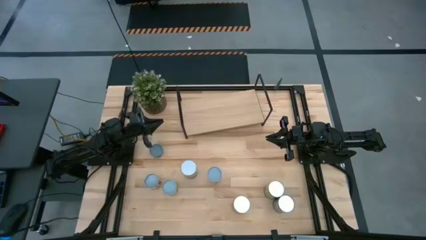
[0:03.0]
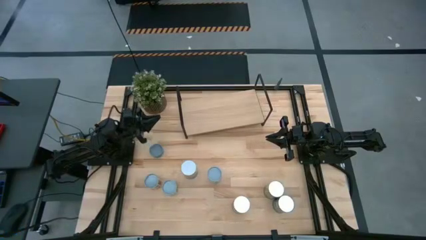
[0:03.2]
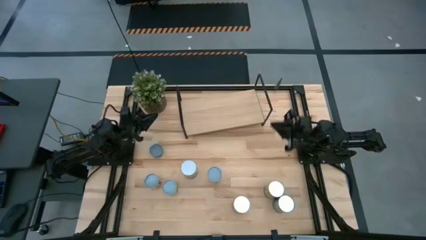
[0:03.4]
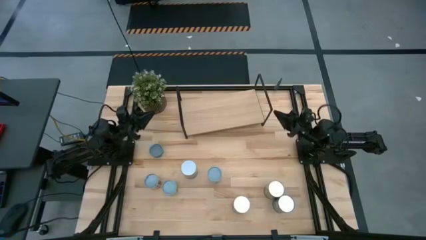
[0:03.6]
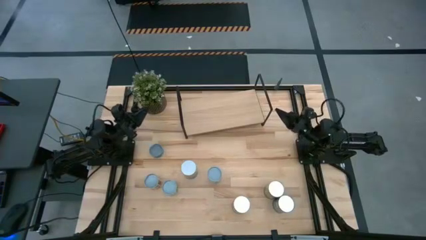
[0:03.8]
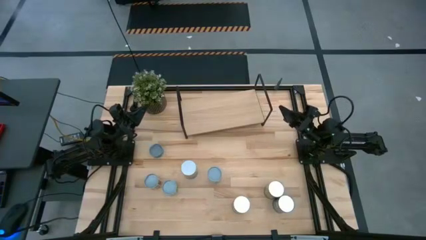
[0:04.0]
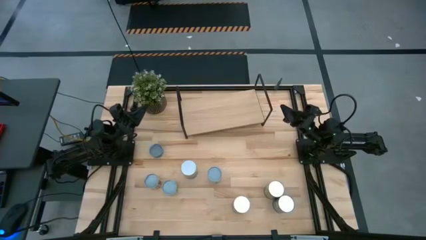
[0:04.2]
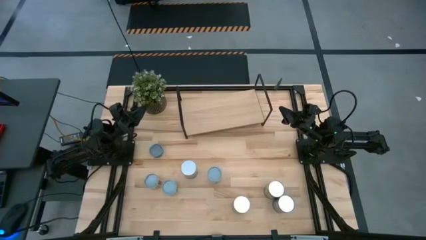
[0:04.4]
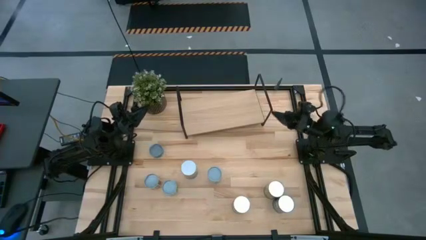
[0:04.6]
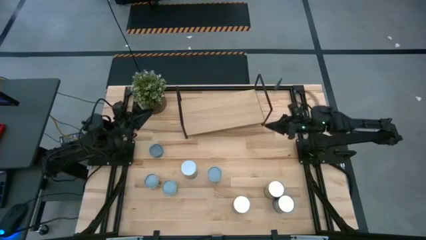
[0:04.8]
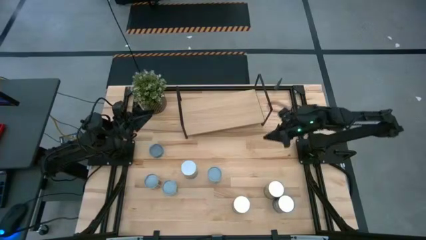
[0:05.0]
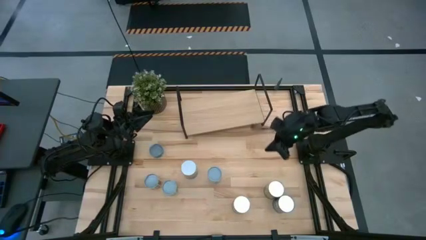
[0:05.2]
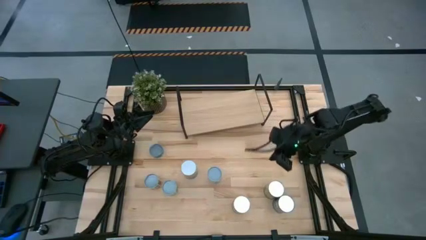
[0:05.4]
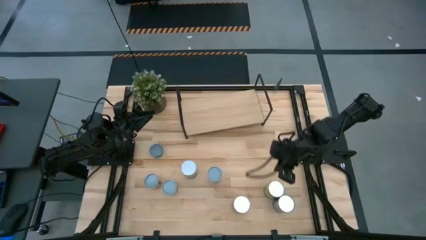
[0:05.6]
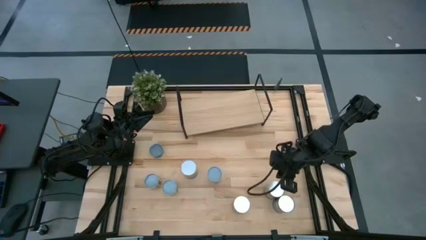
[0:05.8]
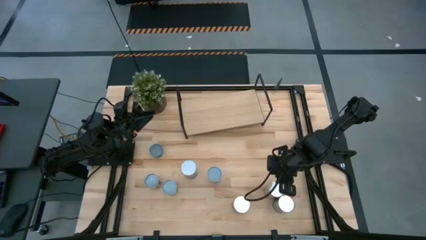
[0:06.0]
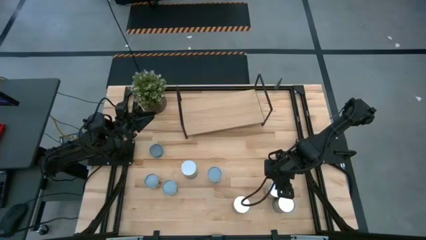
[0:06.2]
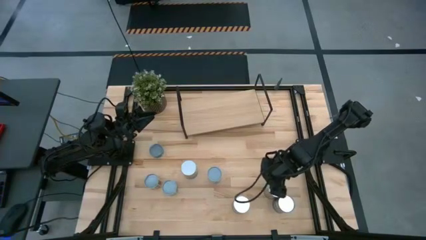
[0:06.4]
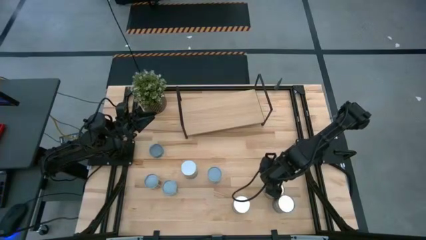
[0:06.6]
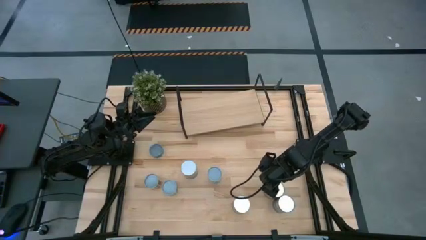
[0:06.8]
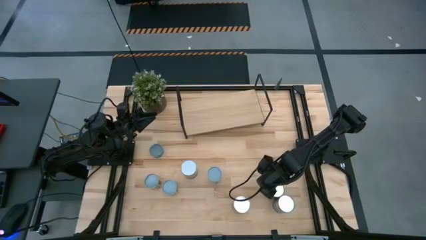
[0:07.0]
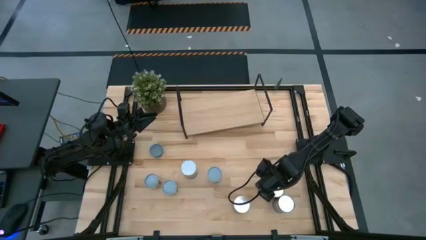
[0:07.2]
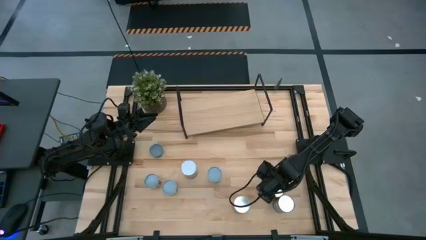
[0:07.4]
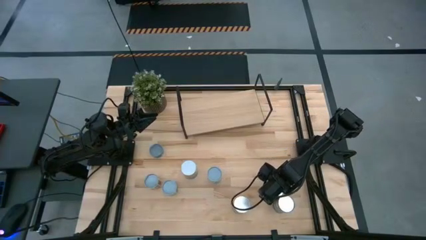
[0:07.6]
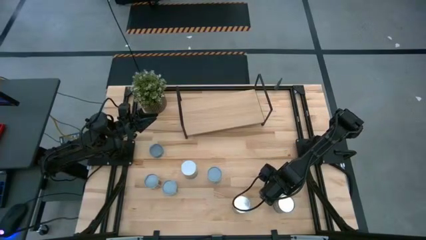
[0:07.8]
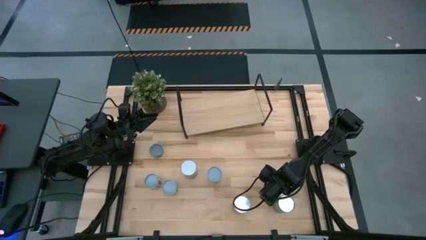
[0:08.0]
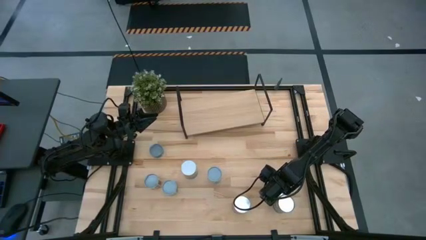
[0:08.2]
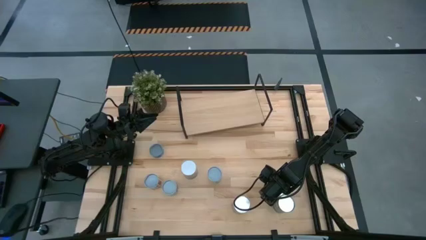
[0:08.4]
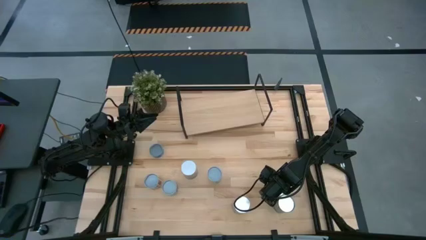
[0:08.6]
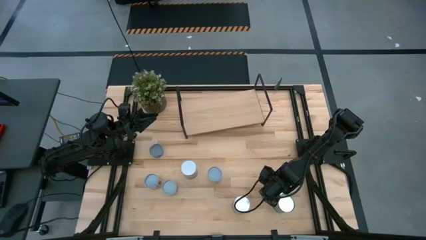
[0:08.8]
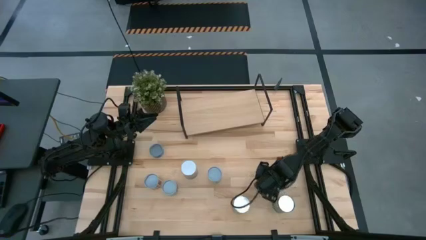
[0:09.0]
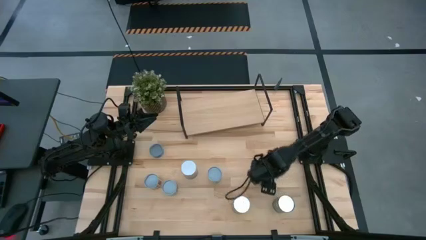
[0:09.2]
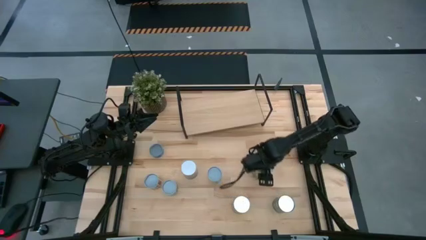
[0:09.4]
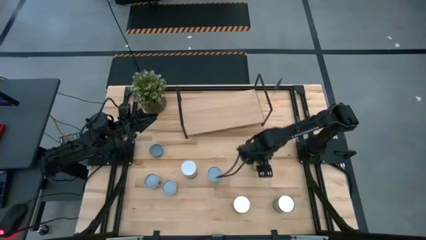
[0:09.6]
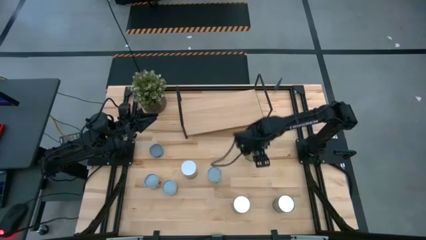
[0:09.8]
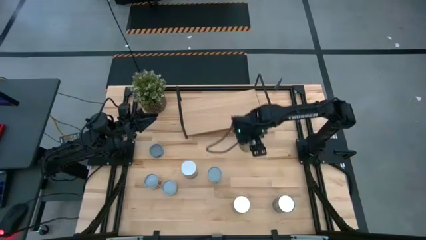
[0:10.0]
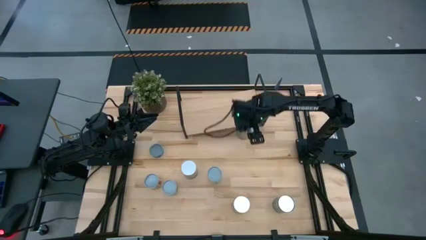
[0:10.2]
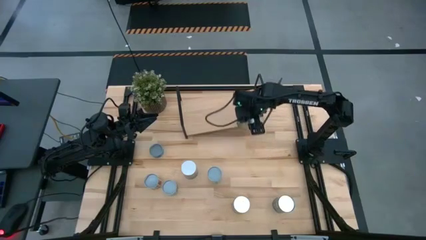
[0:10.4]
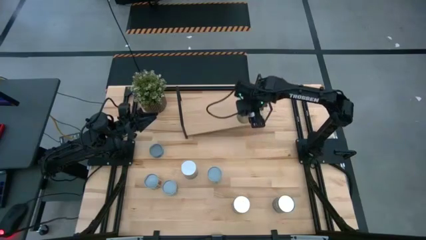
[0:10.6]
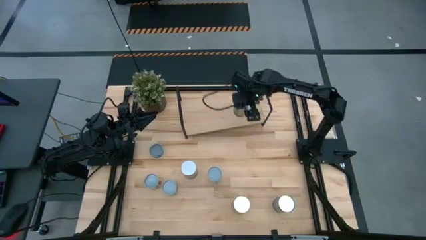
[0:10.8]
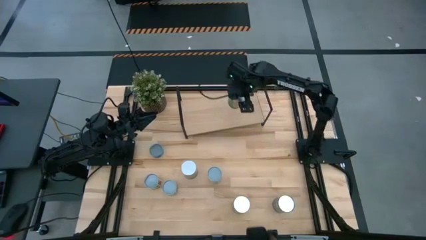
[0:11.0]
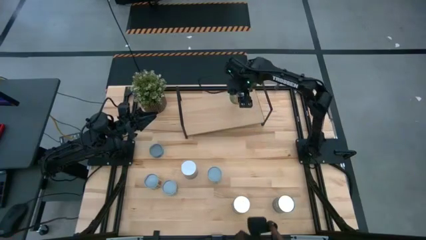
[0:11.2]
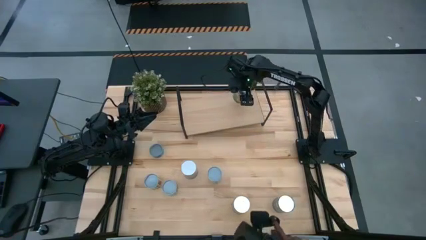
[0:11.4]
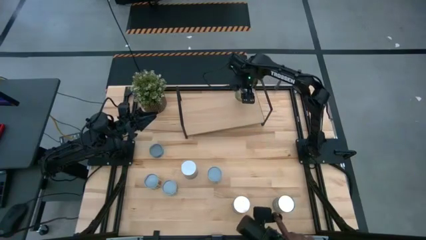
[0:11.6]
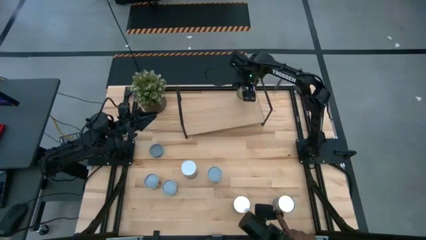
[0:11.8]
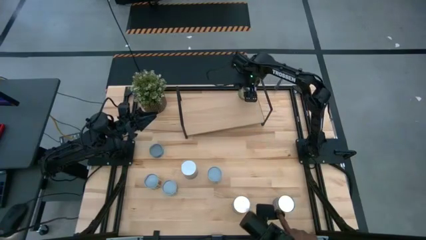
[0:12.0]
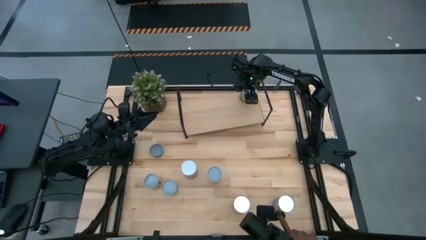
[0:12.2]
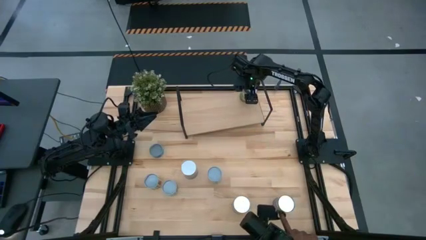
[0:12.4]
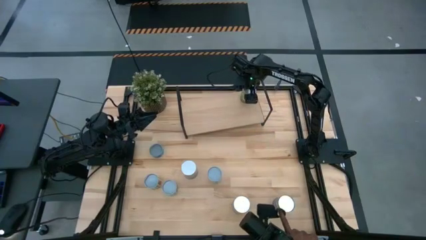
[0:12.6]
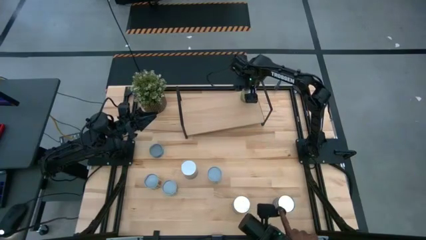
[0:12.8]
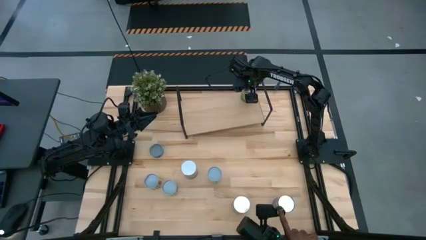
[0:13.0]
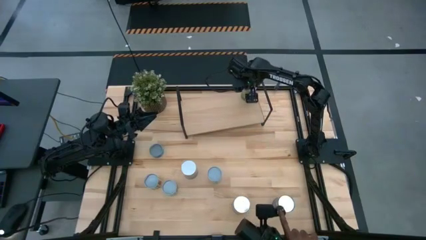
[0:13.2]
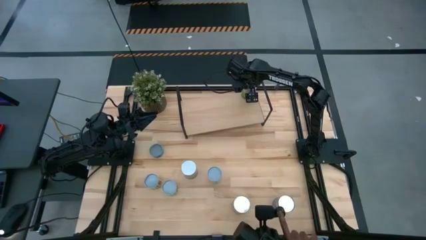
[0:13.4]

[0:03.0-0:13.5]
Task: Pick and place cans onto a shelf
Put the canned oranges on the shelf

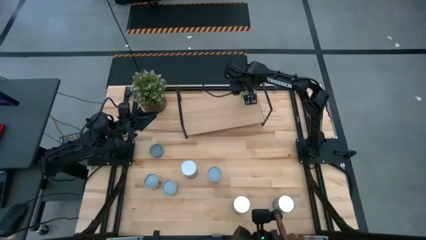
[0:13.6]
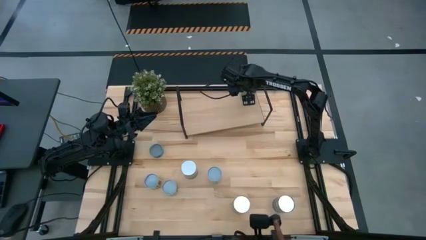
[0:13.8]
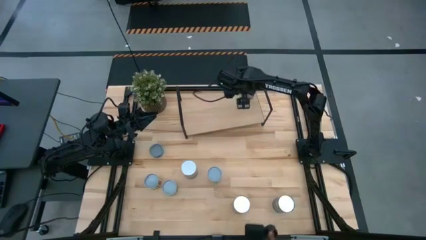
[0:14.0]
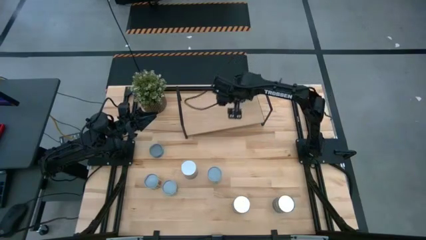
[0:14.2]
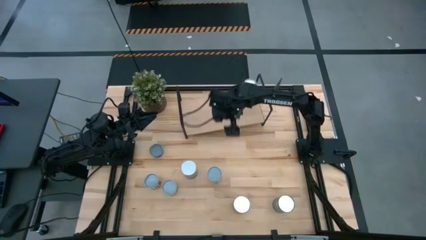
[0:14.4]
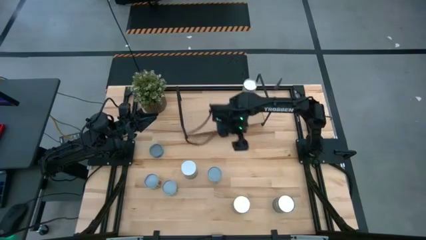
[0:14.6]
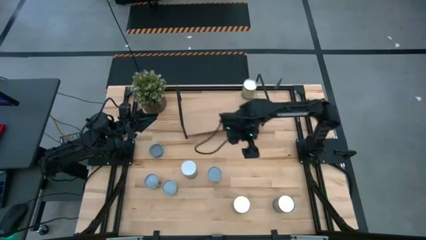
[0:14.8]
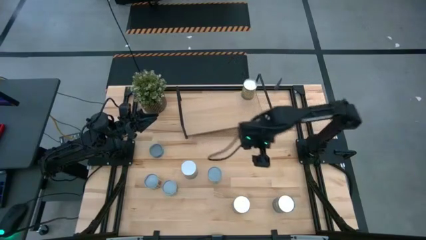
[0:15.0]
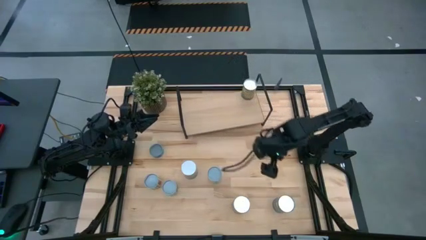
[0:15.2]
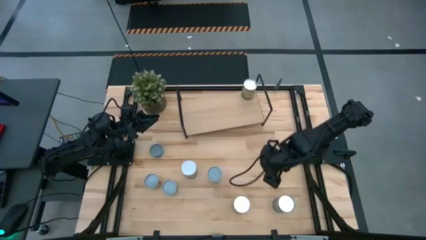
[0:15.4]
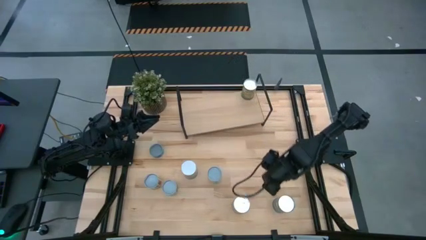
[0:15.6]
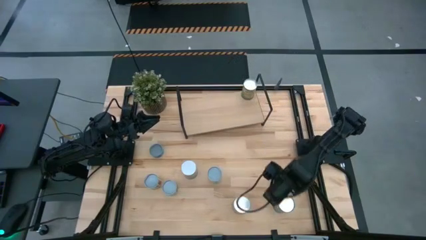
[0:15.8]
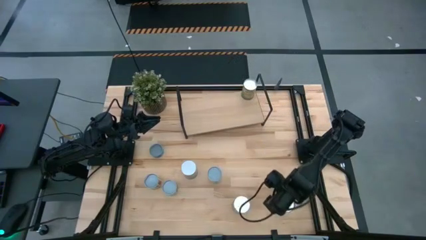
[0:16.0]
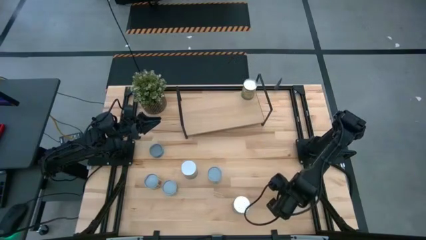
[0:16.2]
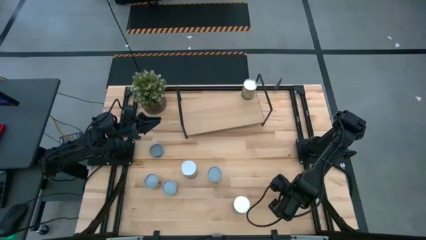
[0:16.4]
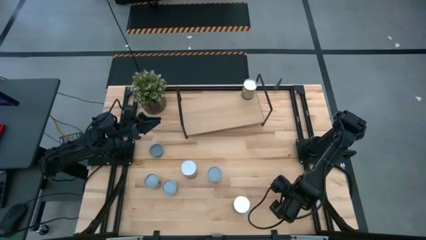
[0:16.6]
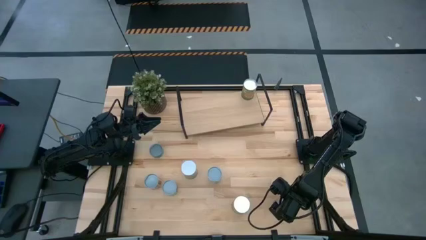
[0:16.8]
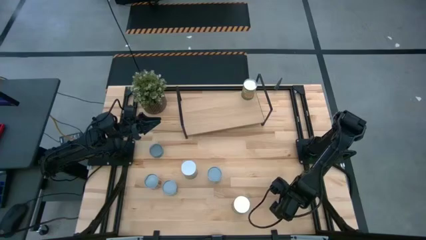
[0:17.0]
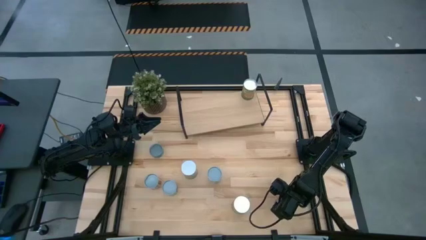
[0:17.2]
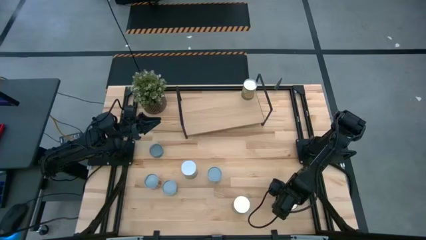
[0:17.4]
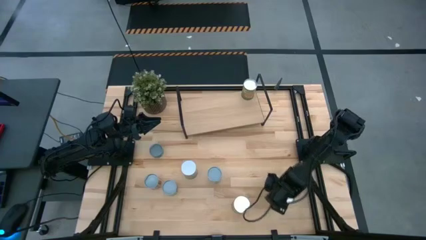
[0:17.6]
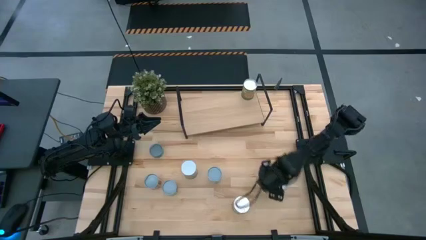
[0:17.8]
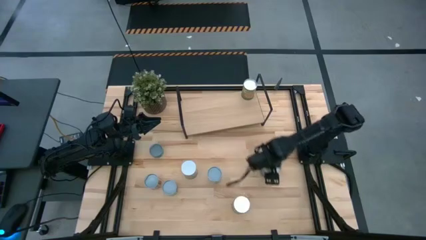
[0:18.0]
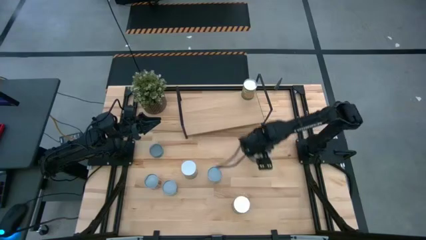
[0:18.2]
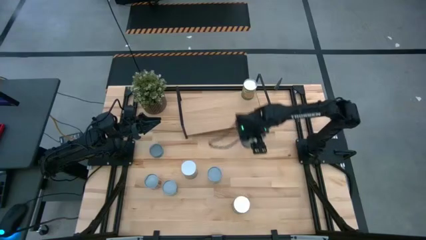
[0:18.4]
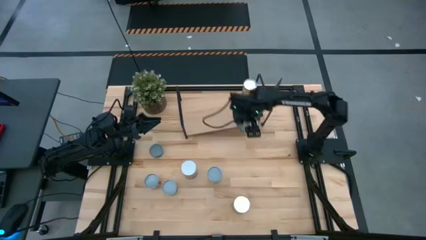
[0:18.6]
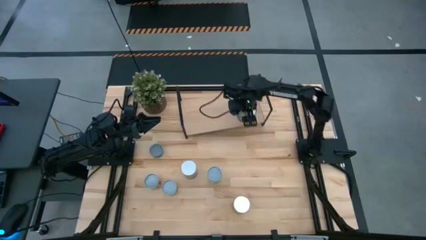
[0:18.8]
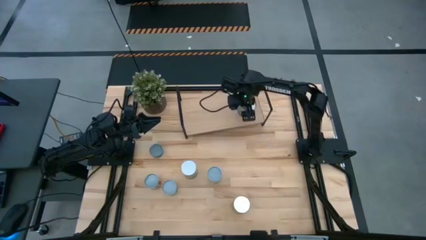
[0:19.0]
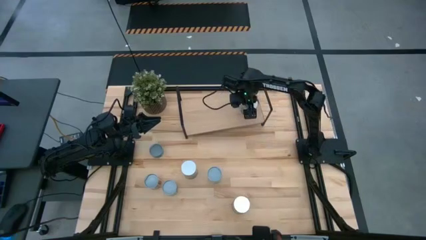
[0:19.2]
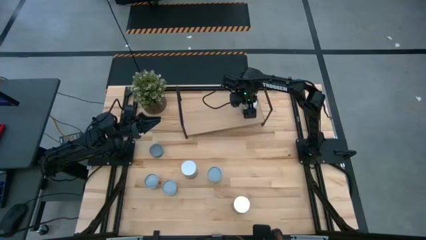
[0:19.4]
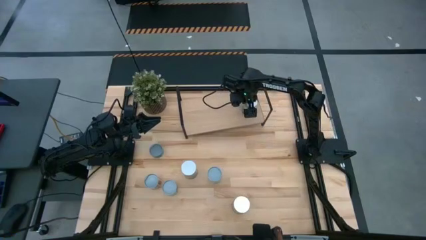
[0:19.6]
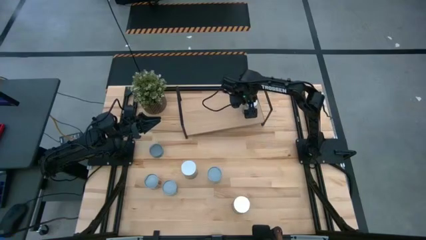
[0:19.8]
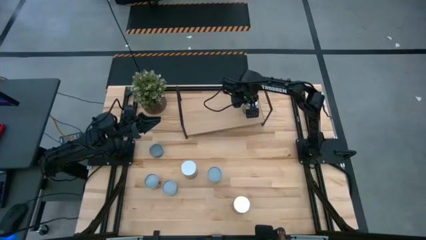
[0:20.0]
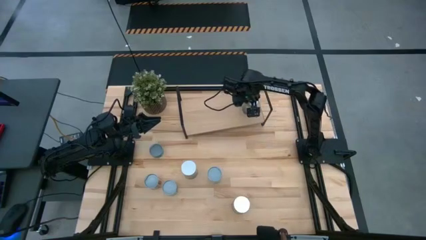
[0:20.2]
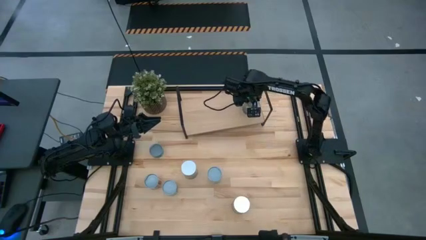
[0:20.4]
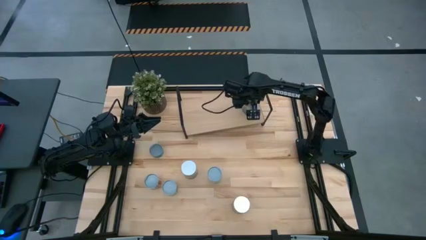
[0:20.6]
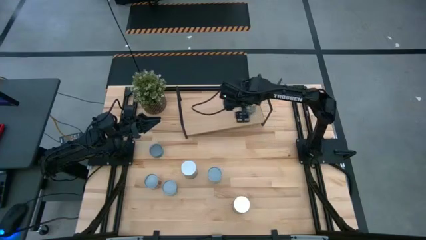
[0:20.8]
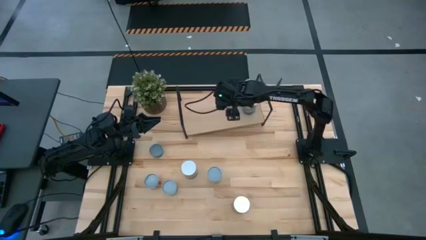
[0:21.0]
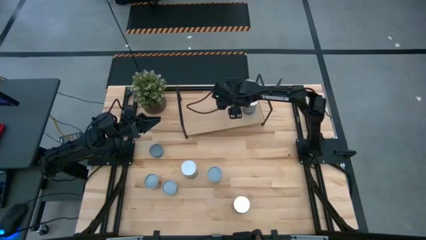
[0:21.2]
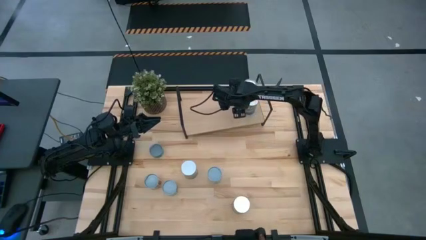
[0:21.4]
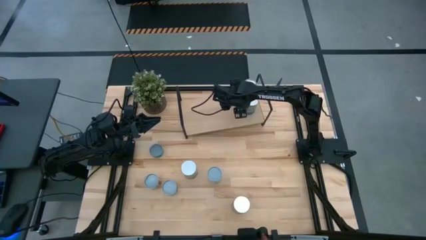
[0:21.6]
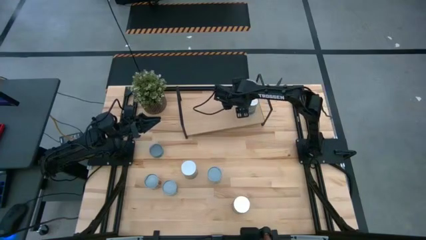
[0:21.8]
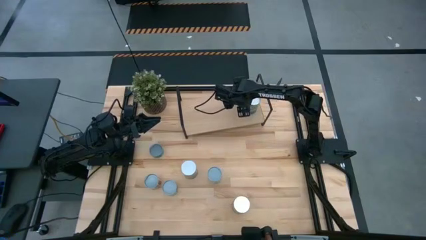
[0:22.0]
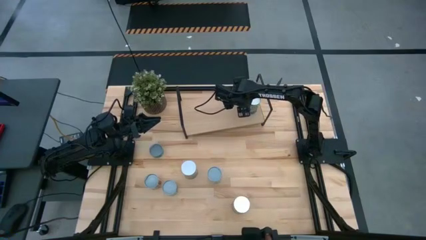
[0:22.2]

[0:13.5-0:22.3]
Put the canned peas on the shelf
